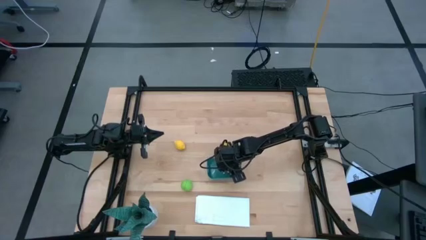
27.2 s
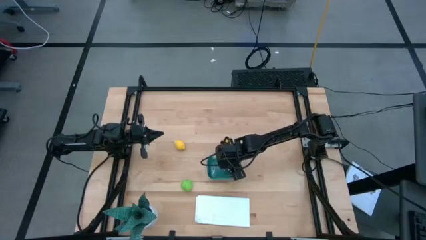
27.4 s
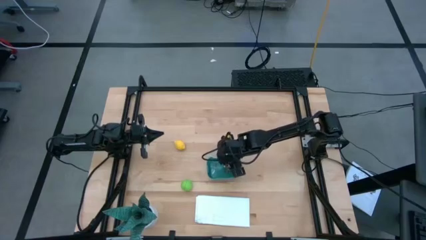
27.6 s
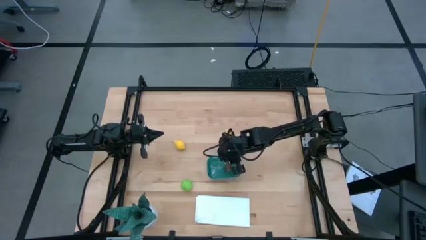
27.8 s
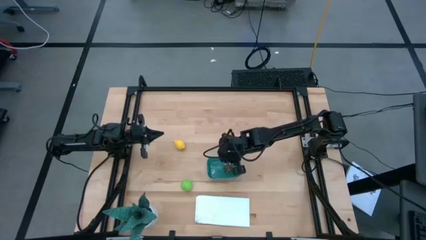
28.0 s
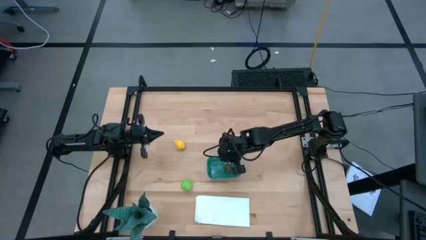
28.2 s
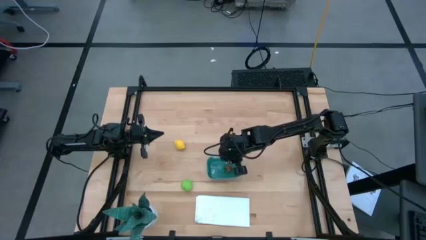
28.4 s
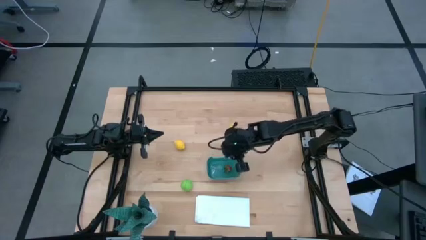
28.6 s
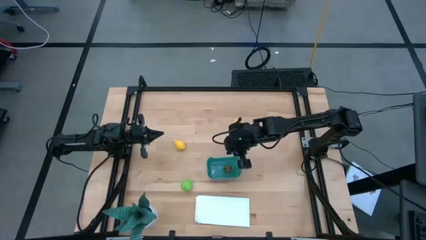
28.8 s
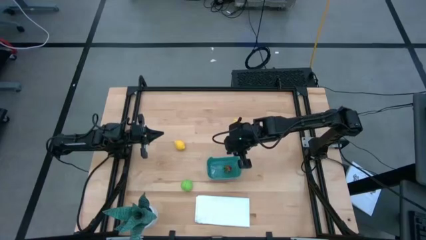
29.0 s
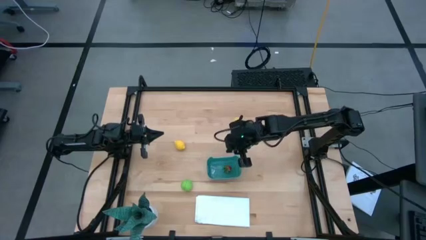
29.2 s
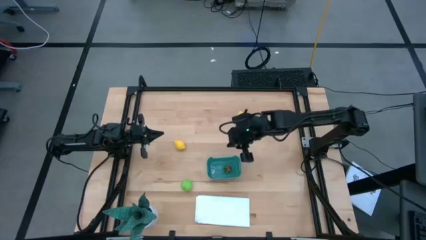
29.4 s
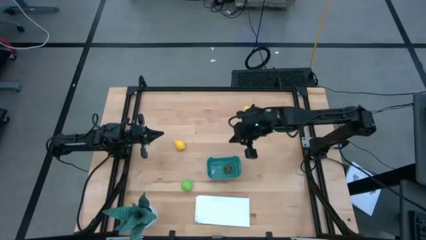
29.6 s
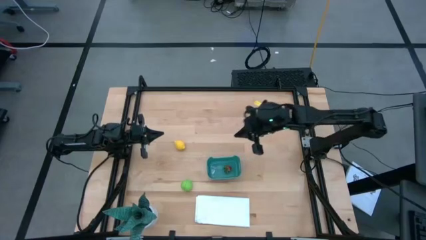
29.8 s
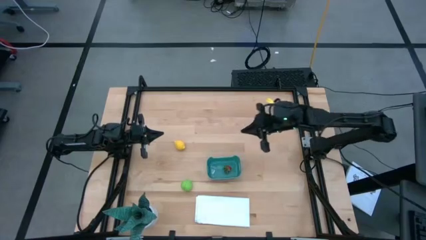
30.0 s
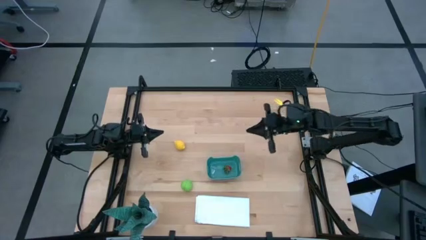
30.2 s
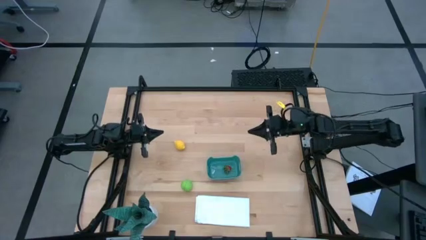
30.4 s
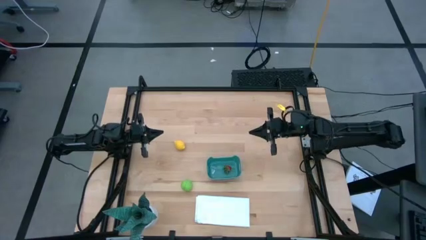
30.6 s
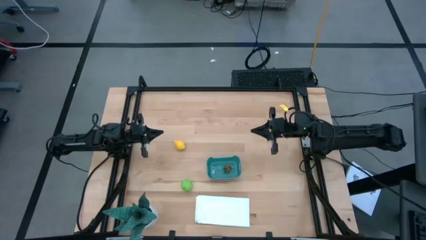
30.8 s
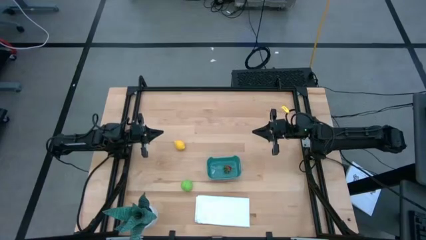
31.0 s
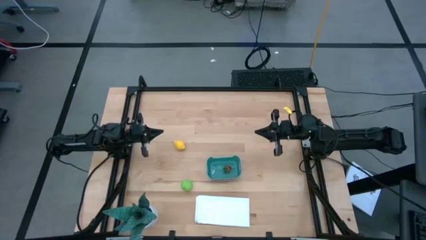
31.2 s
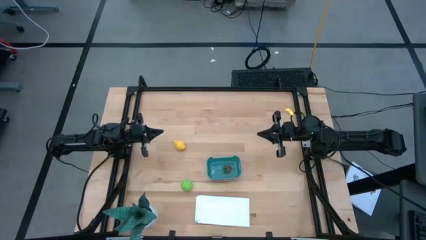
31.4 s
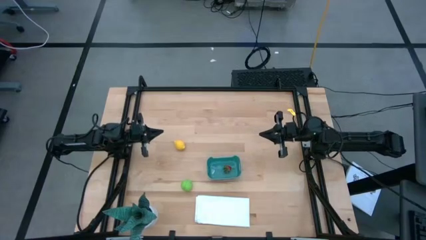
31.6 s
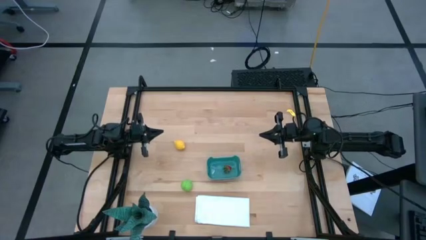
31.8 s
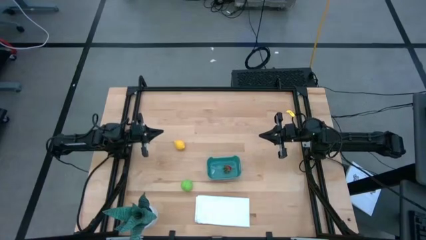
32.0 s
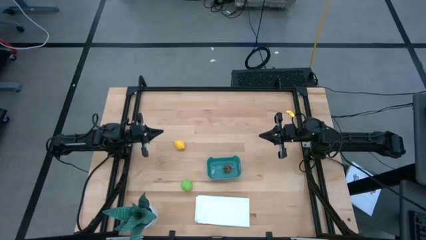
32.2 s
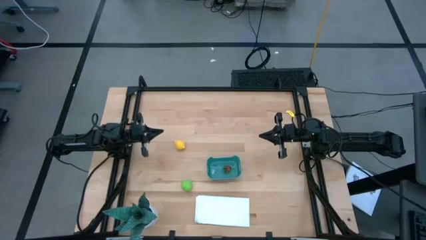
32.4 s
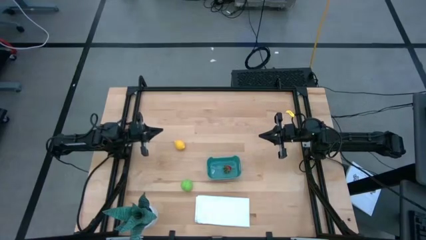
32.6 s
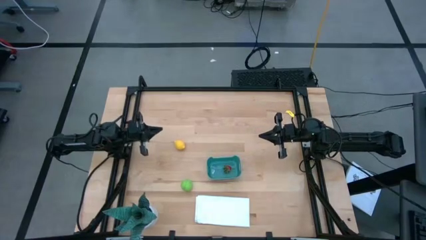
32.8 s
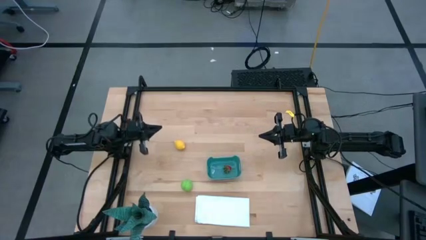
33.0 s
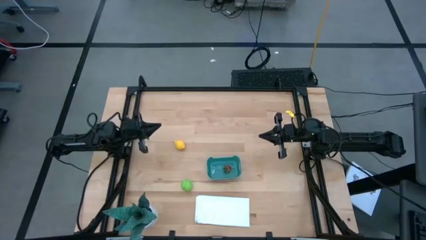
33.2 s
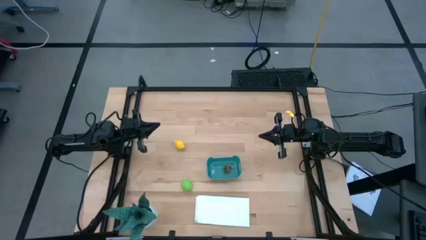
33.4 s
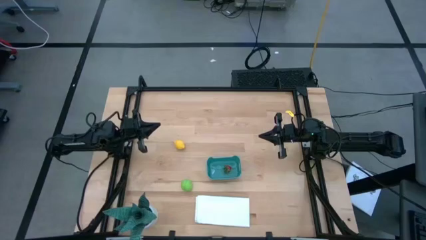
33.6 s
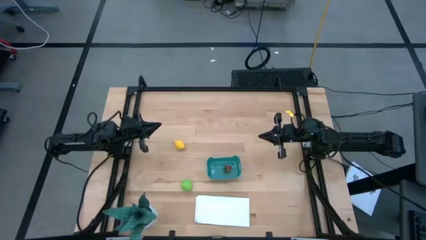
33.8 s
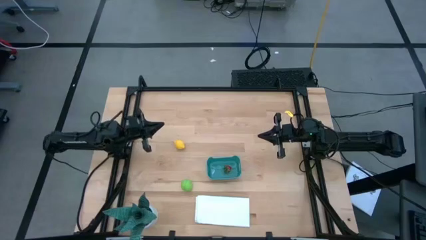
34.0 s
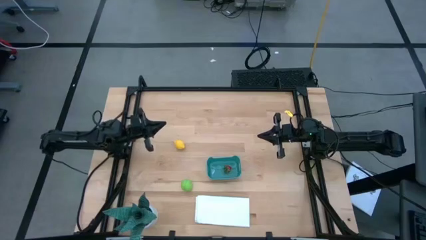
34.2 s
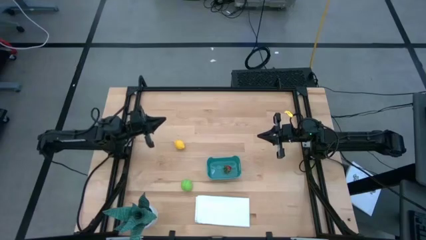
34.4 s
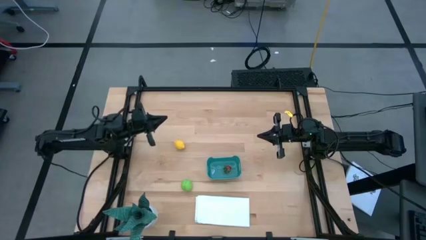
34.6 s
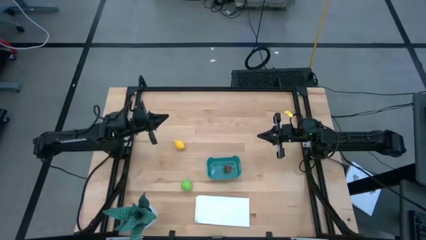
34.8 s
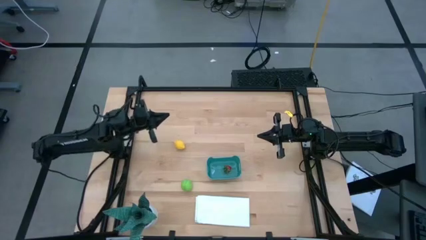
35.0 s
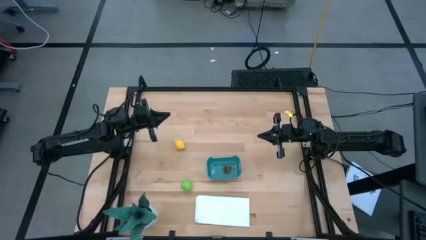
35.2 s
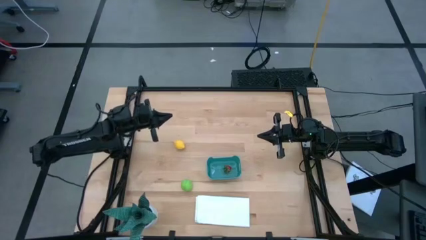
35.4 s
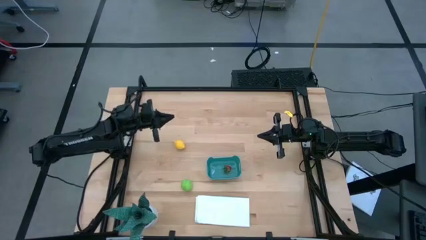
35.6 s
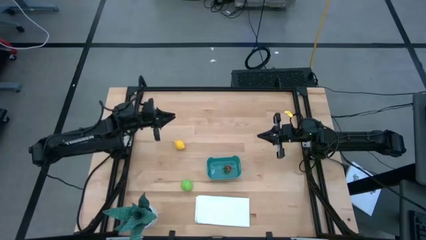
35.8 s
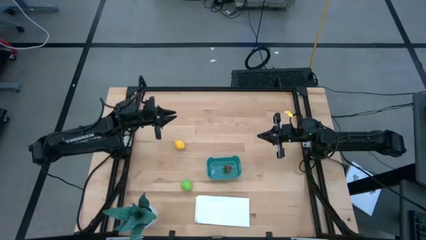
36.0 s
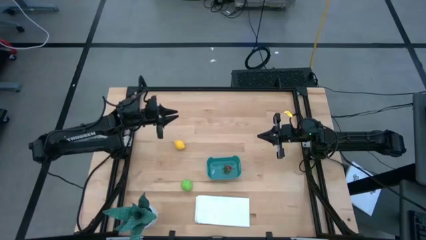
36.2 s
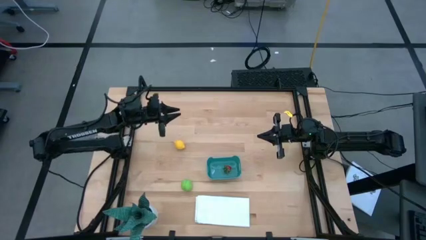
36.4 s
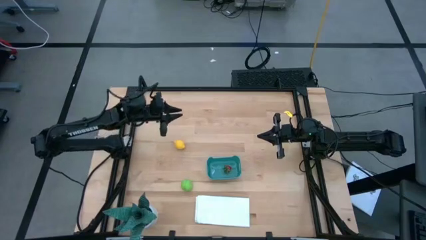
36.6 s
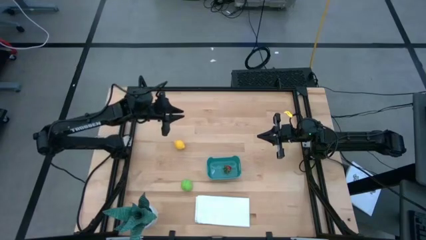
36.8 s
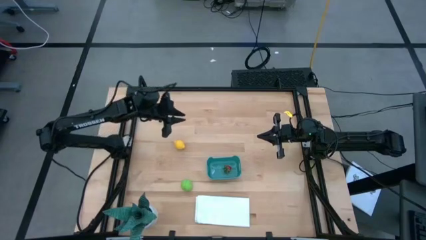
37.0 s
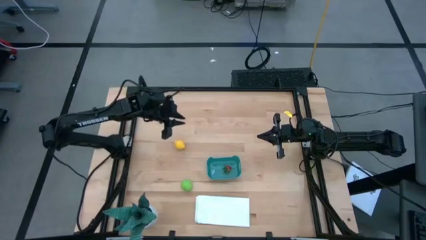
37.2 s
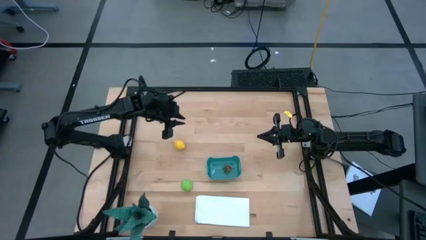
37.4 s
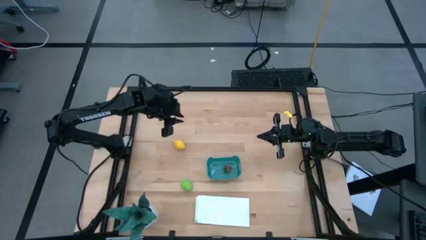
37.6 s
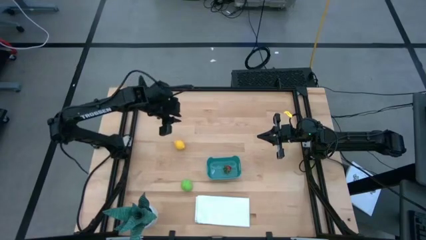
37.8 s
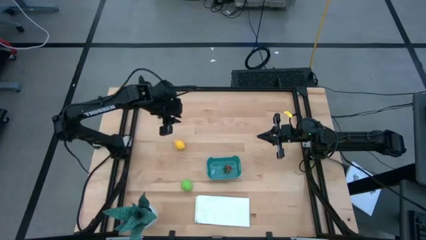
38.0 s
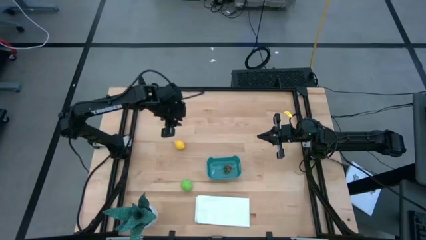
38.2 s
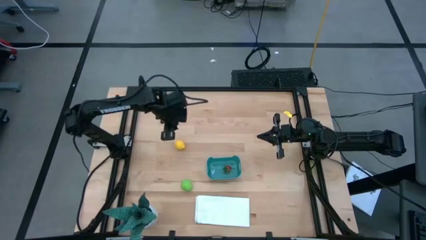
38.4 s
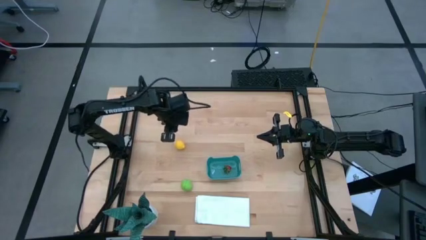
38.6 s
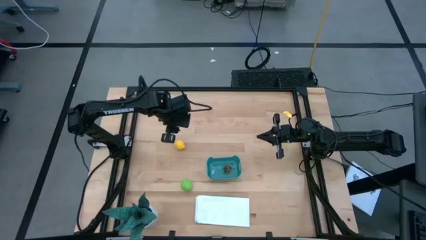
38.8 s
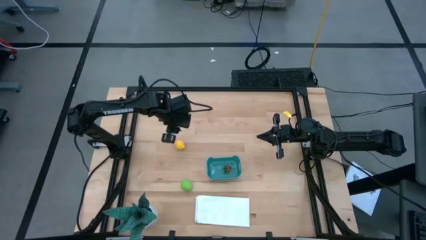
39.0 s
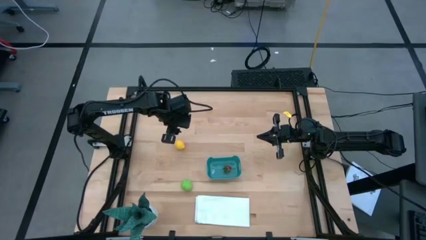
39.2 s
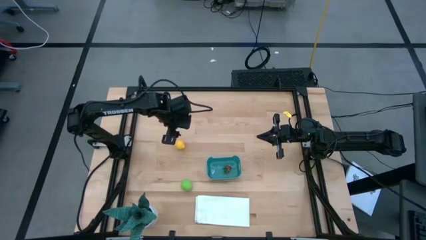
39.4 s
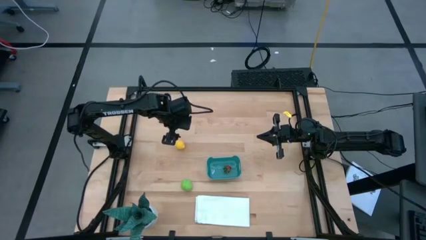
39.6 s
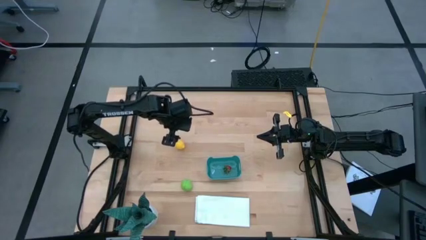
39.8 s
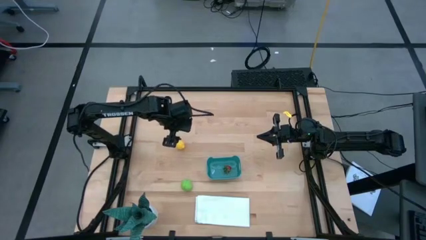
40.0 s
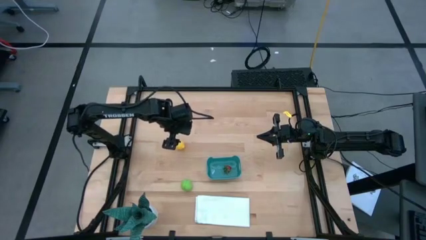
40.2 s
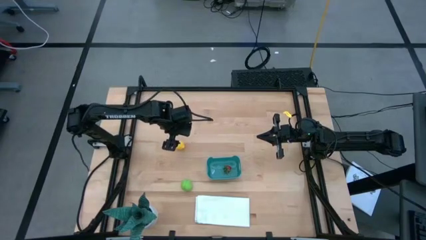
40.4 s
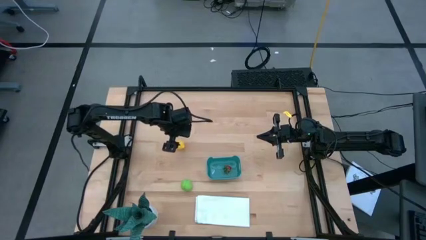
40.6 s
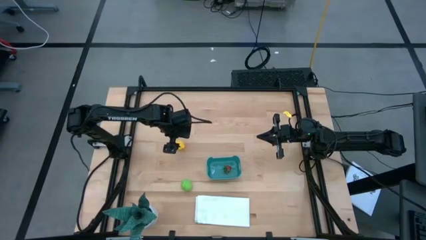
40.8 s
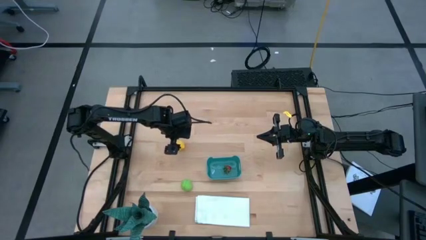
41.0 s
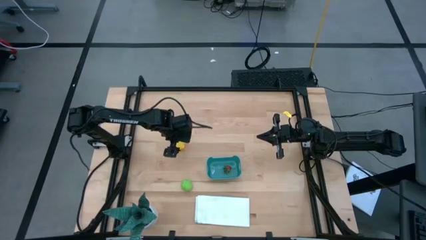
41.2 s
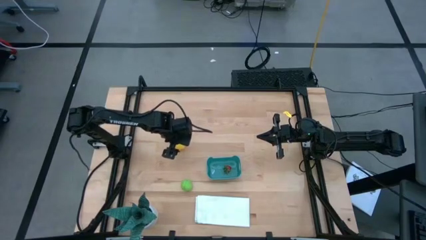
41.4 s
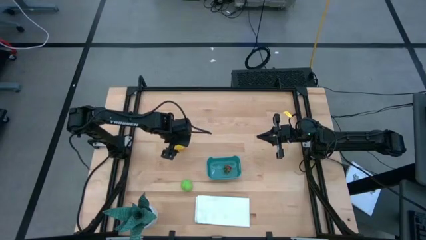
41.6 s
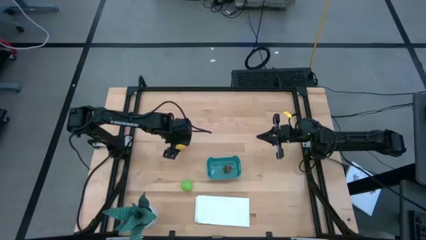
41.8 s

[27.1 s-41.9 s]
Task: Pick and placing Produce into tupperware
Put the lemon into the green bin
